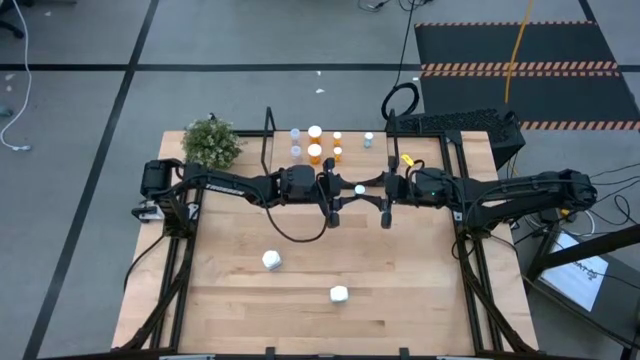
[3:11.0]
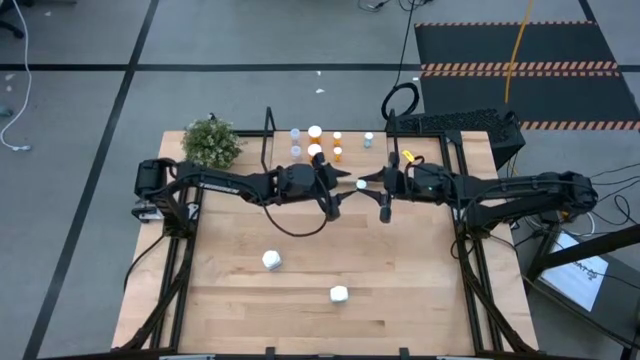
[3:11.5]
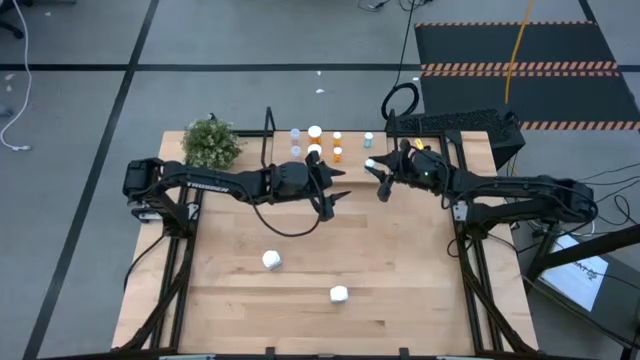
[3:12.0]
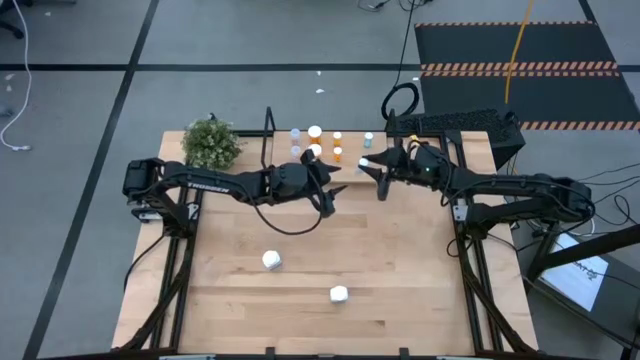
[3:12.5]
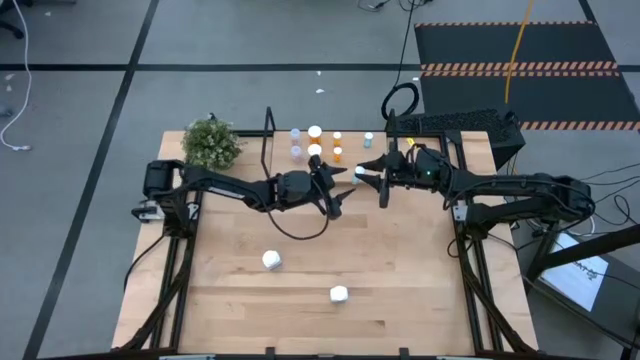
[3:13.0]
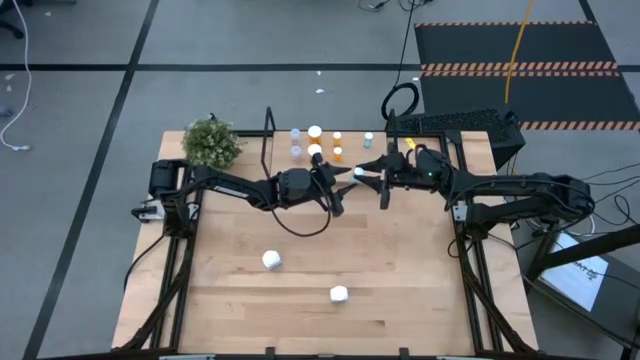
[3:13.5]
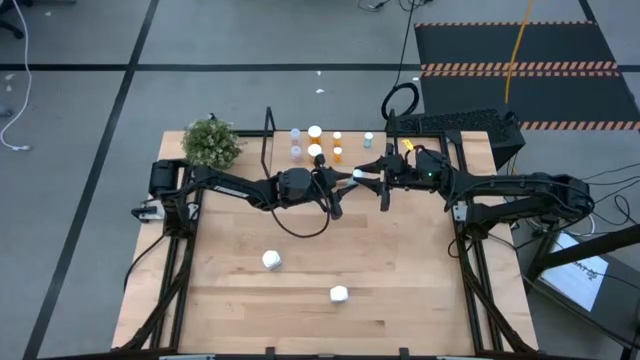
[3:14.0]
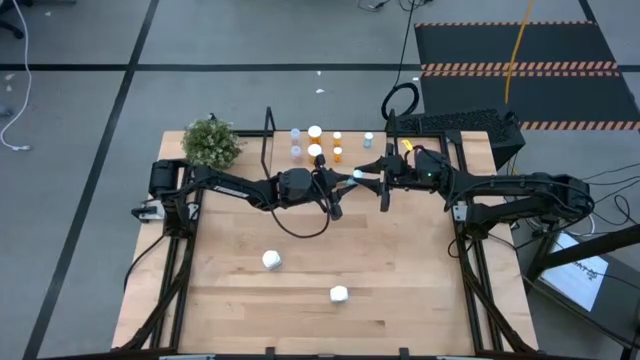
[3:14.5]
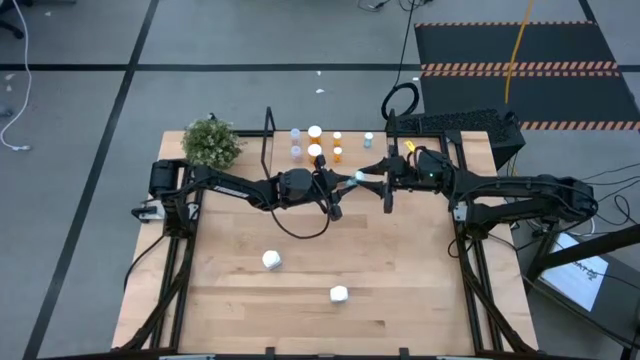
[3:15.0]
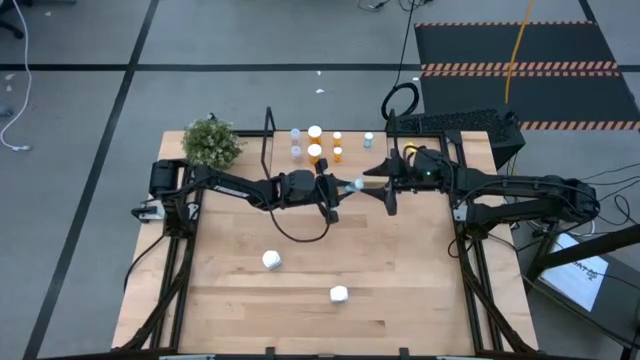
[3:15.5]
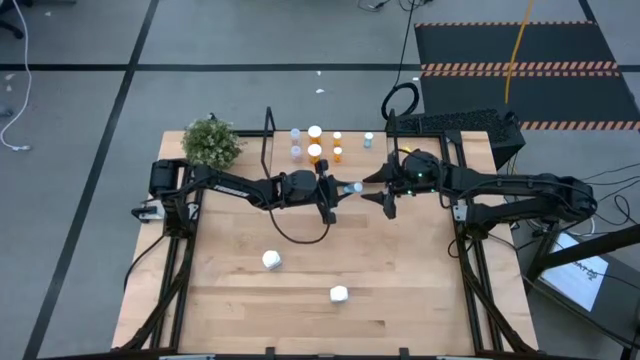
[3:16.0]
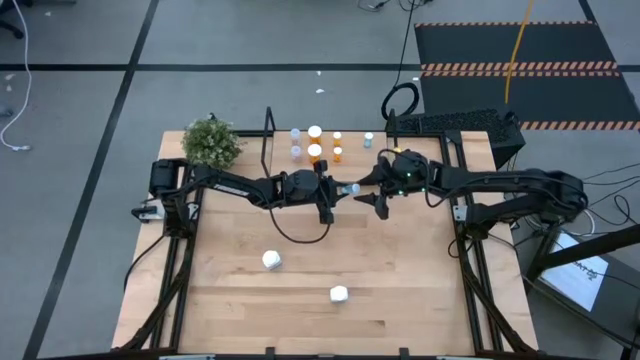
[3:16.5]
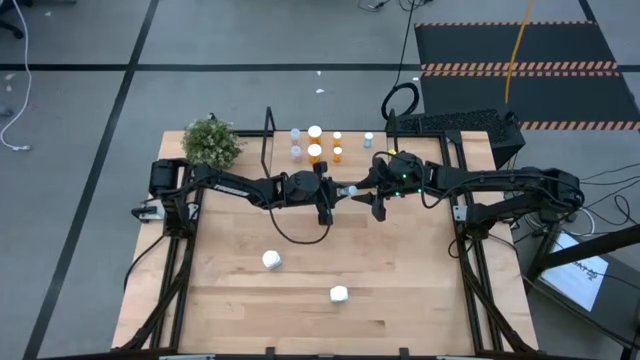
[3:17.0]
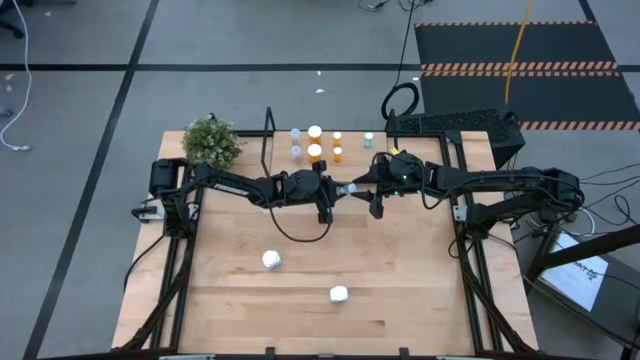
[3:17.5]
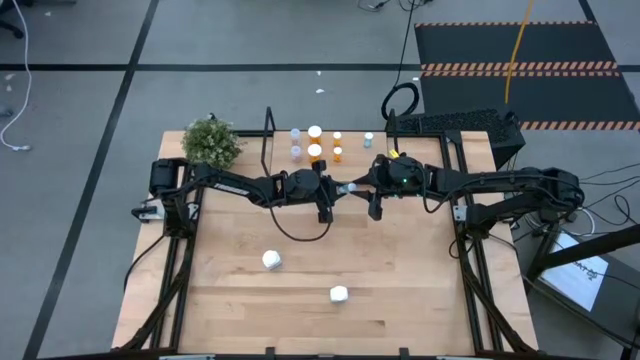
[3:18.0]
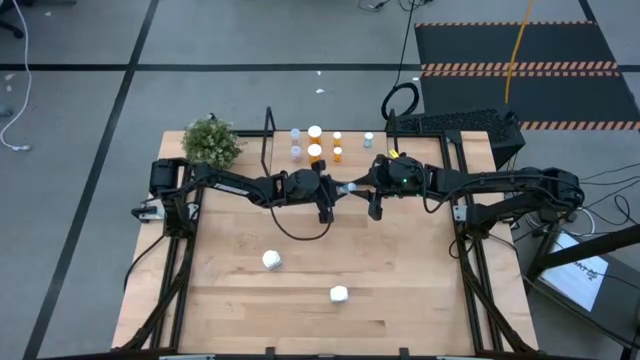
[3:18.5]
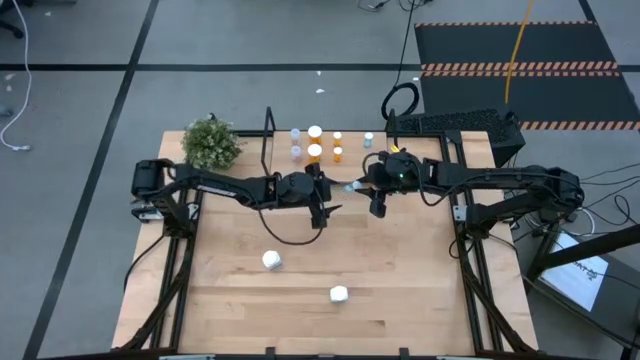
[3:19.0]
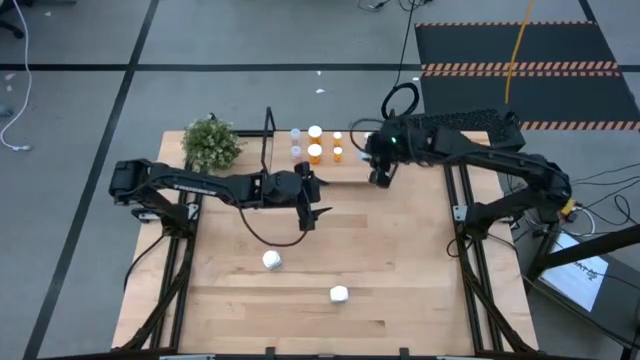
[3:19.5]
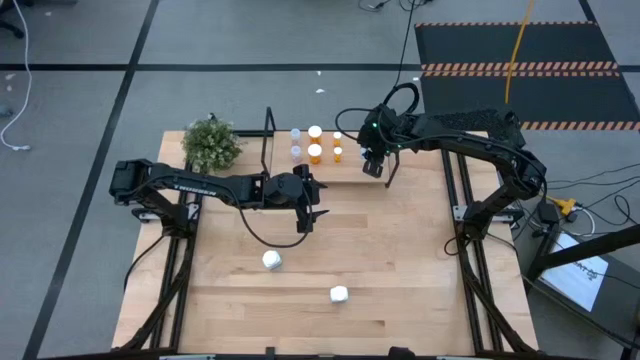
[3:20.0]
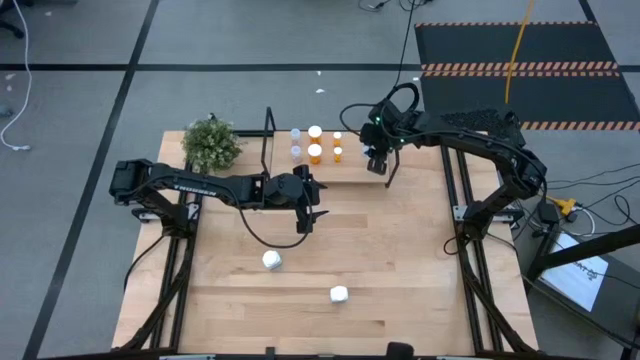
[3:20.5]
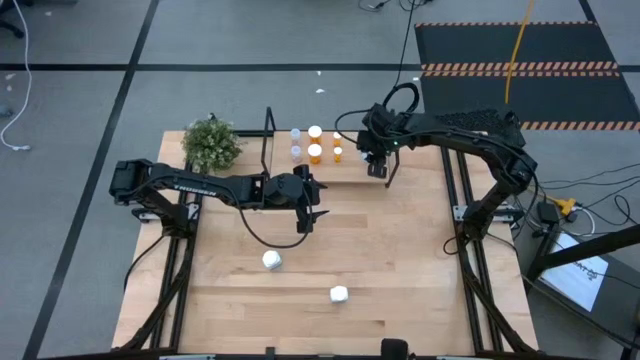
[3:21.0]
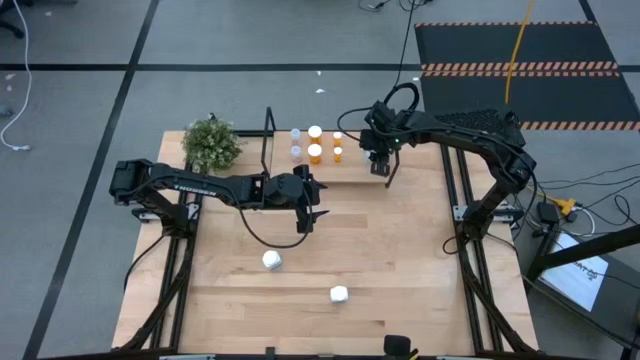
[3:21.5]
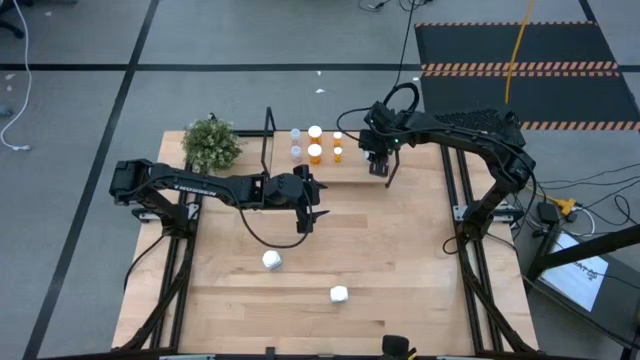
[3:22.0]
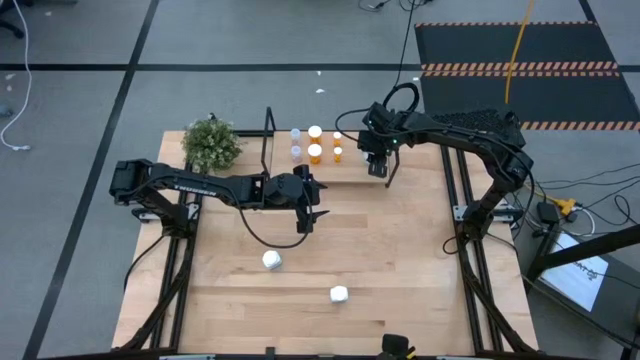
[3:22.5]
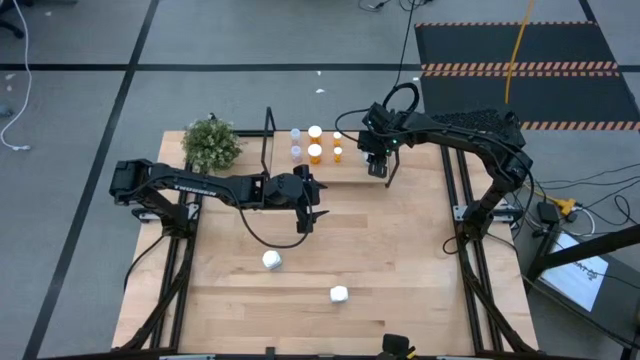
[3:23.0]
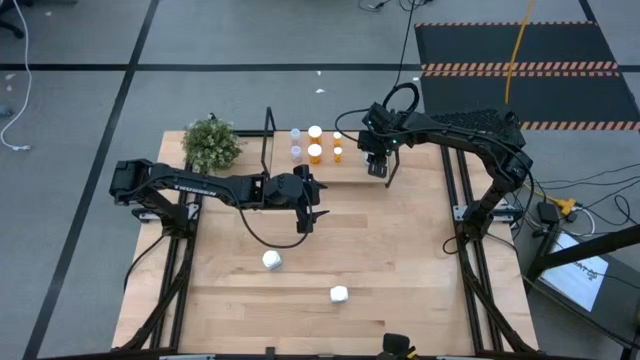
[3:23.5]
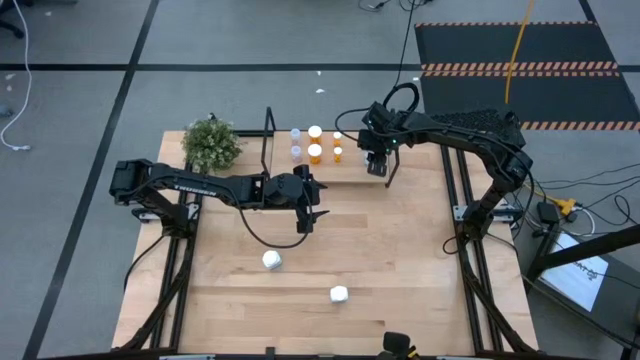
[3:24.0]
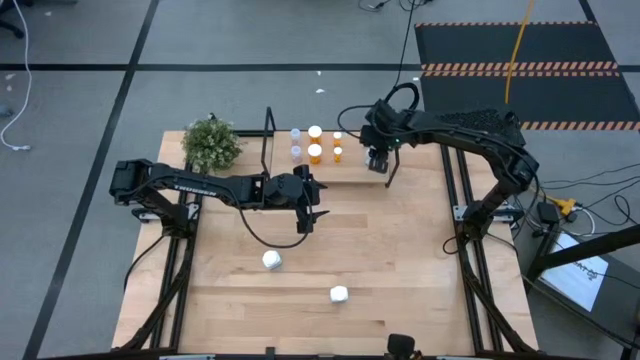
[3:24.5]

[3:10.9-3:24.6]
Task: Pick and place medicine bottles onto shelf by color
Put the blue pill bottle on the shelf aligned with the other blue pill bottle

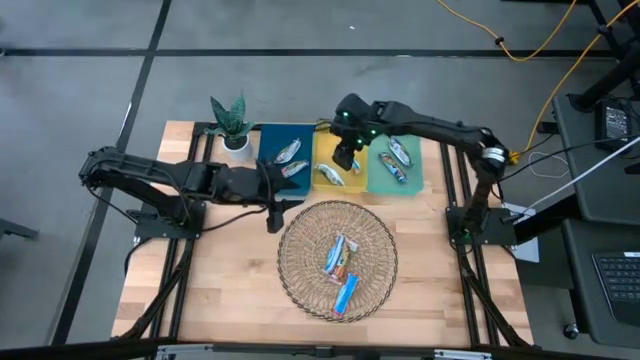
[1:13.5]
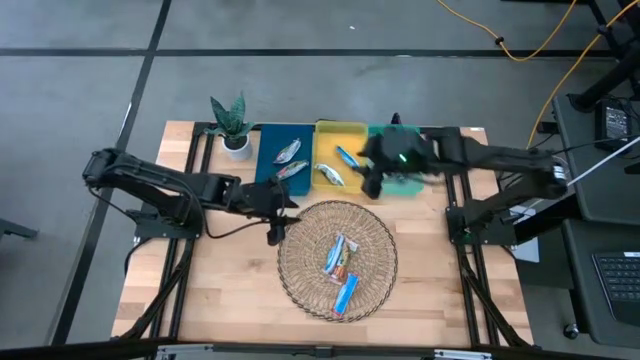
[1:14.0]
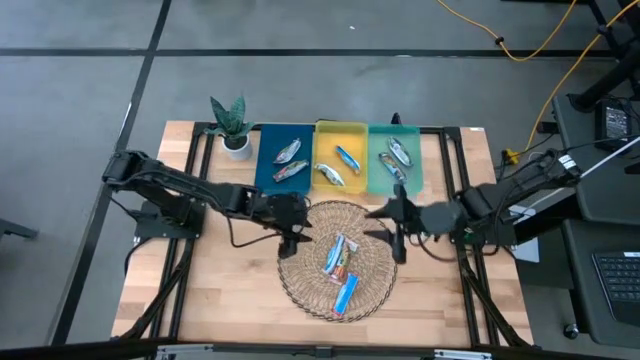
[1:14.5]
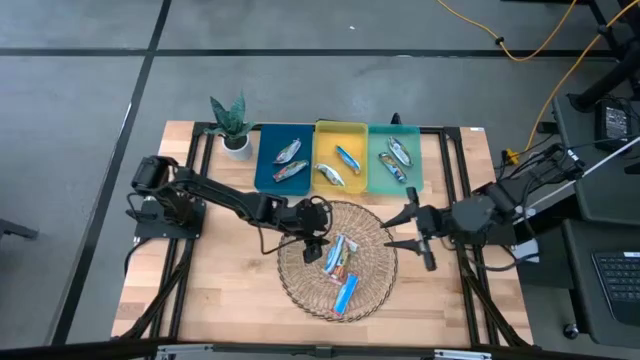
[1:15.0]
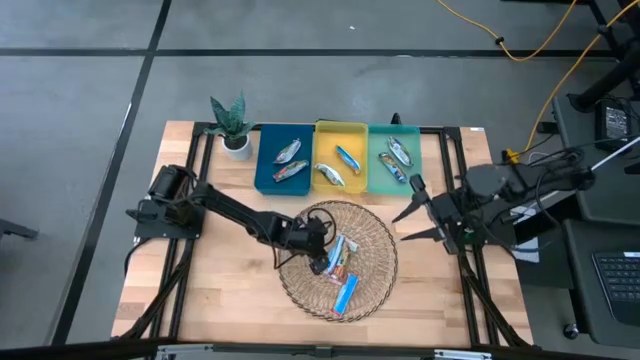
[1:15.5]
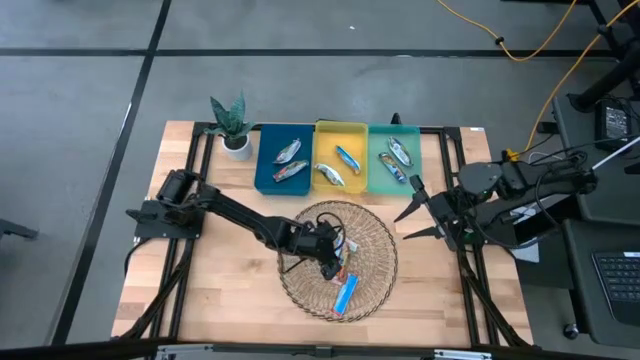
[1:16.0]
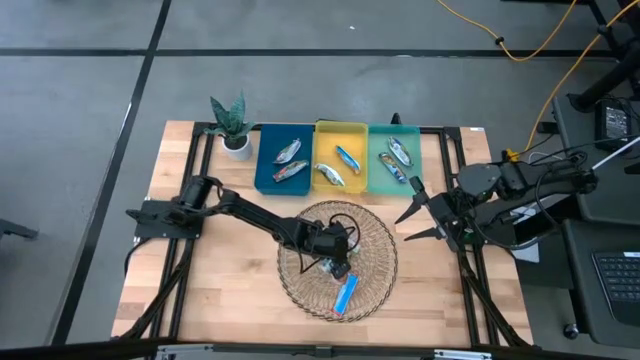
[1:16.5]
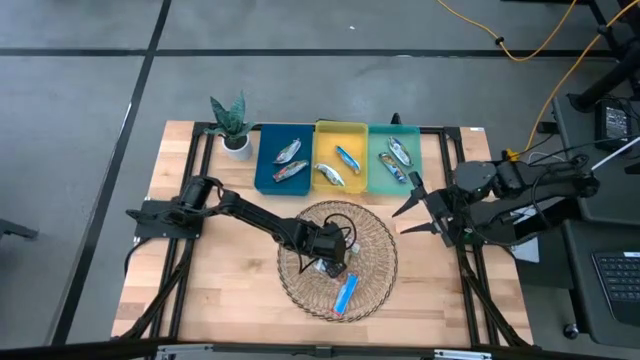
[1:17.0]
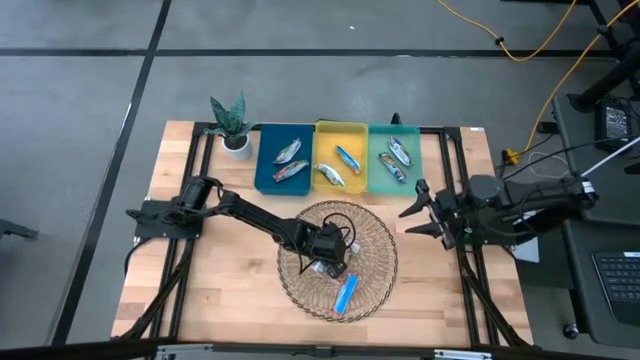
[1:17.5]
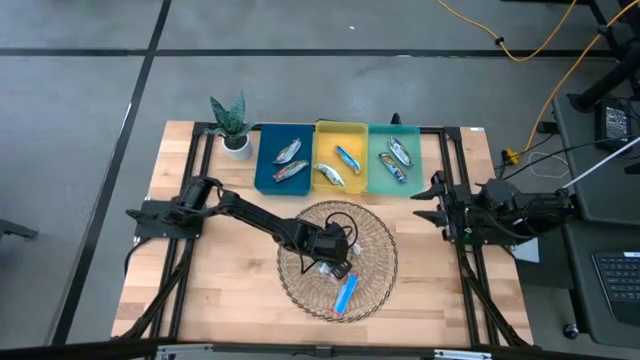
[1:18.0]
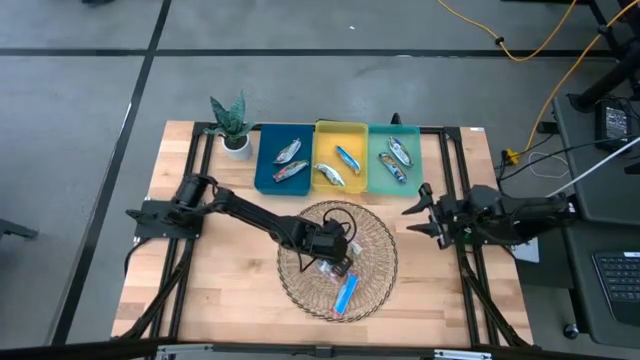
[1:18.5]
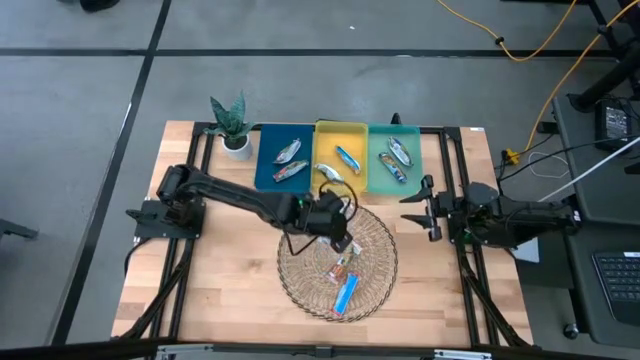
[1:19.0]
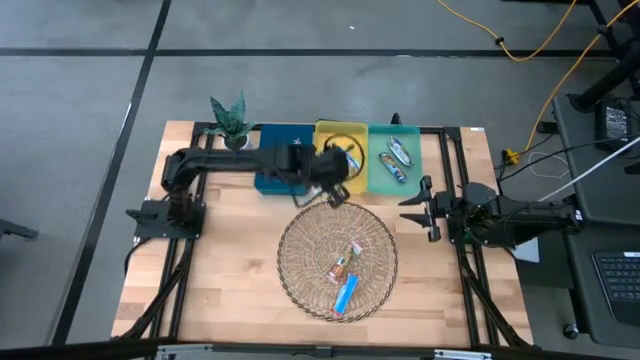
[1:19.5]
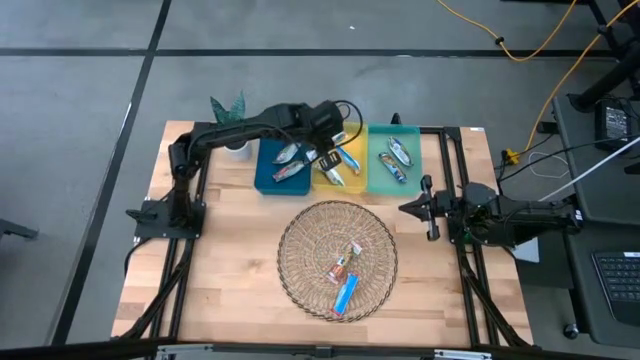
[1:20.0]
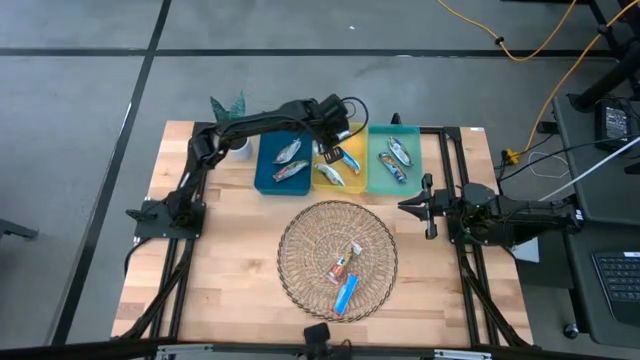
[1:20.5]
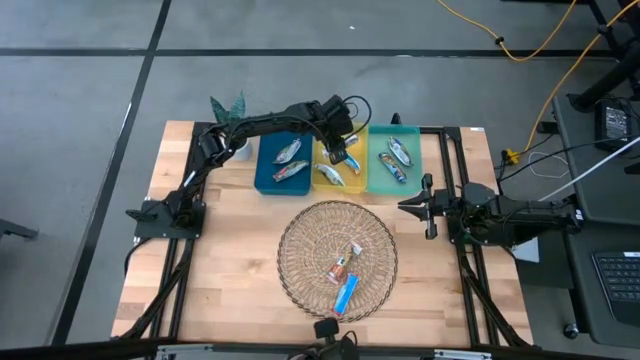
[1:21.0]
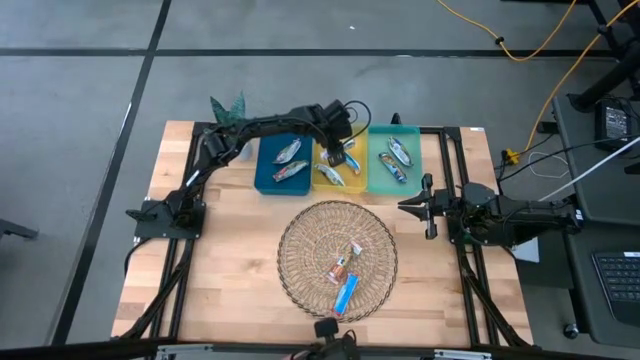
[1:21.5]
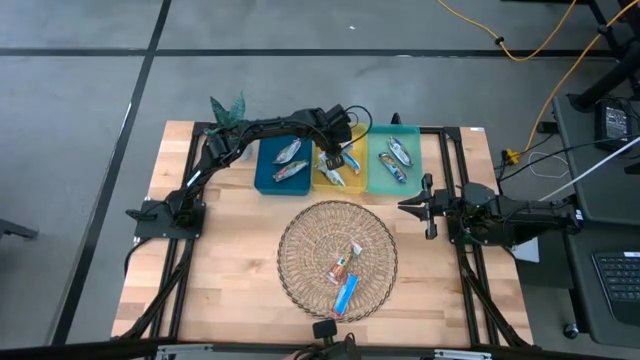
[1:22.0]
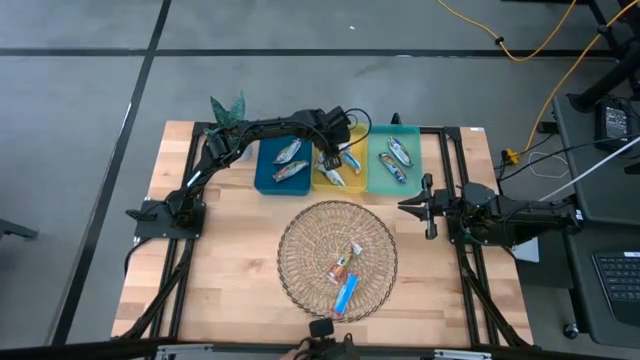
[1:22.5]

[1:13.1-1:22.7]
Task: Pick and place Granola Bars by type
Put the yellow granola bar into the yellow bin
